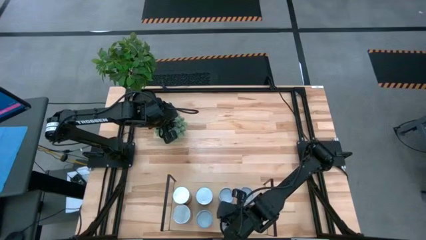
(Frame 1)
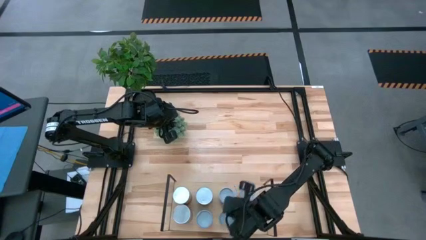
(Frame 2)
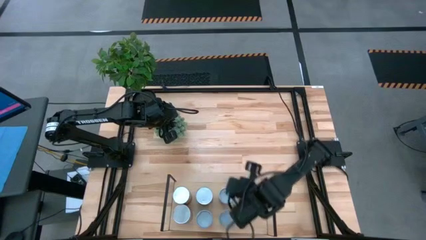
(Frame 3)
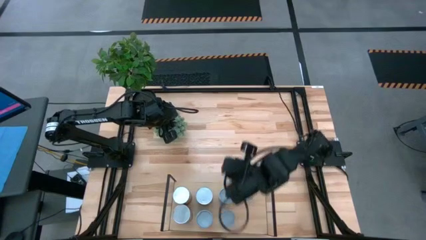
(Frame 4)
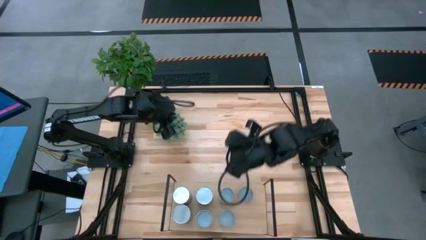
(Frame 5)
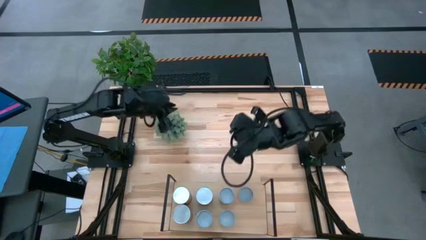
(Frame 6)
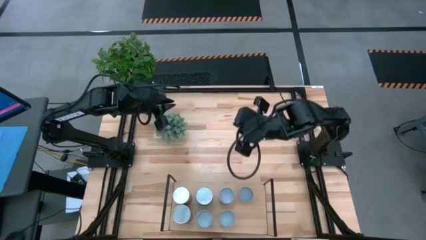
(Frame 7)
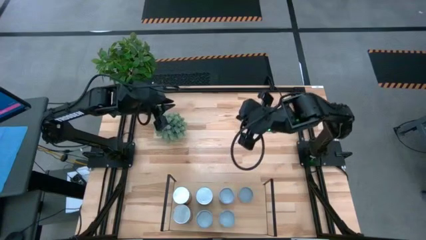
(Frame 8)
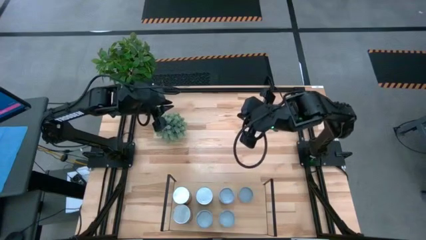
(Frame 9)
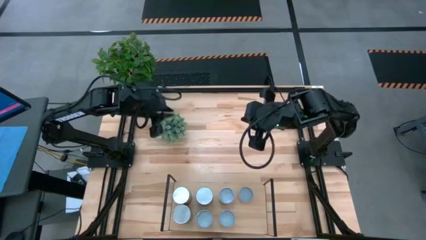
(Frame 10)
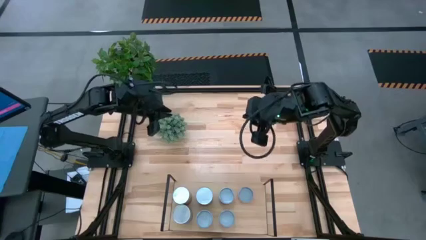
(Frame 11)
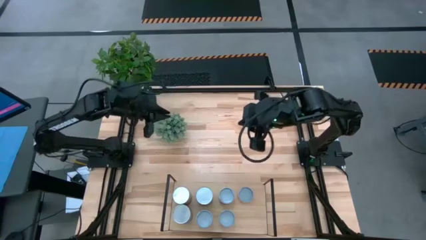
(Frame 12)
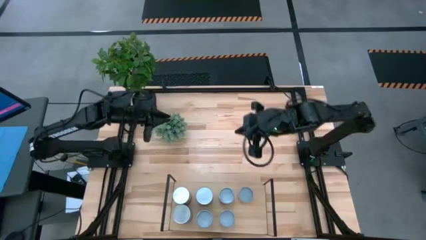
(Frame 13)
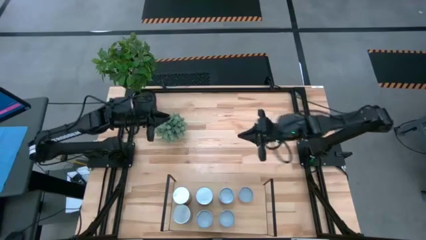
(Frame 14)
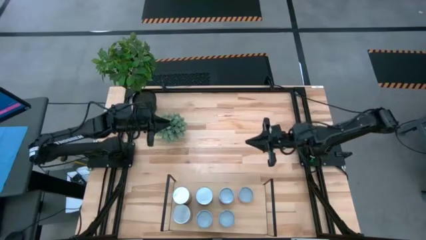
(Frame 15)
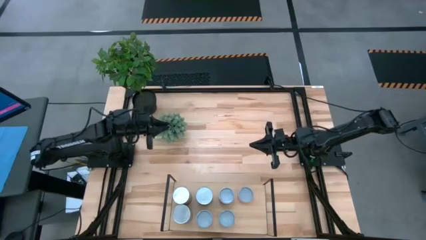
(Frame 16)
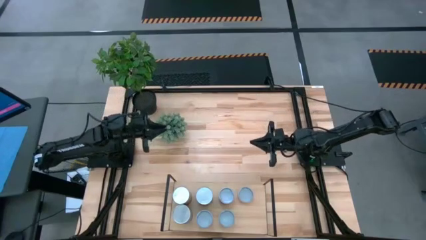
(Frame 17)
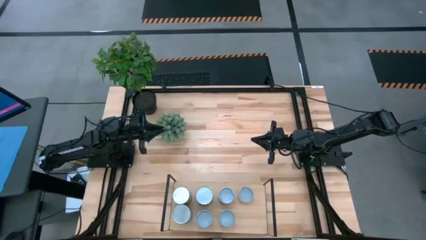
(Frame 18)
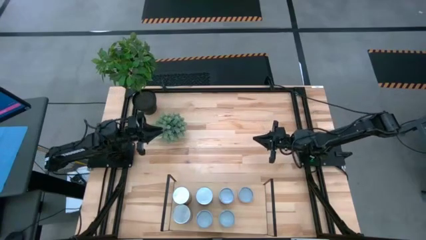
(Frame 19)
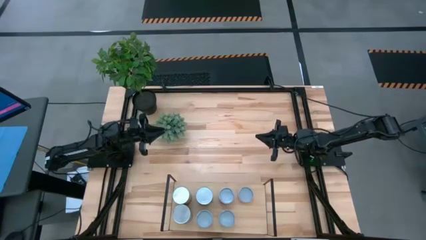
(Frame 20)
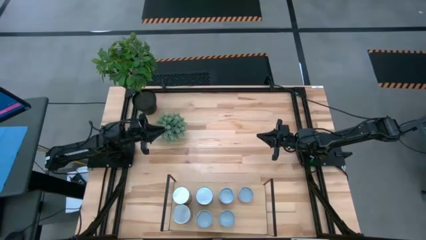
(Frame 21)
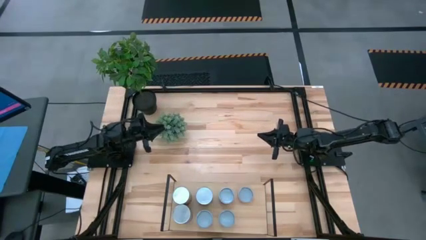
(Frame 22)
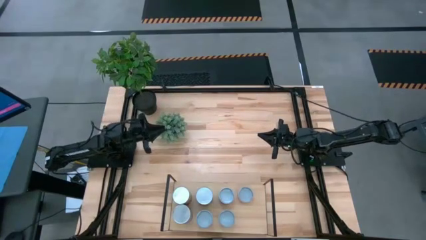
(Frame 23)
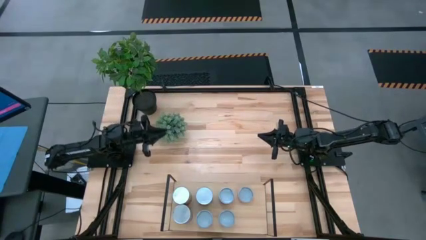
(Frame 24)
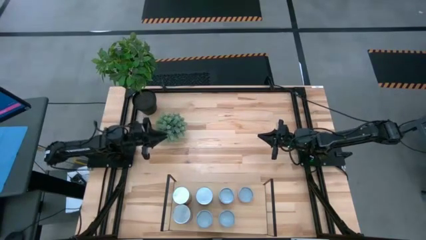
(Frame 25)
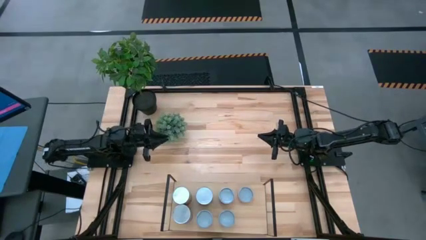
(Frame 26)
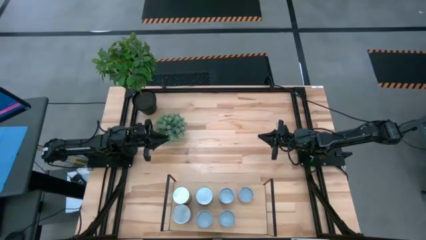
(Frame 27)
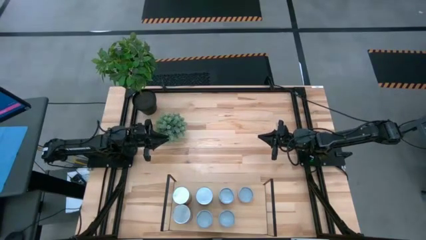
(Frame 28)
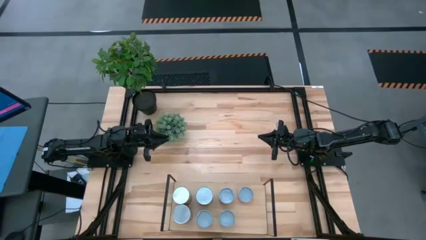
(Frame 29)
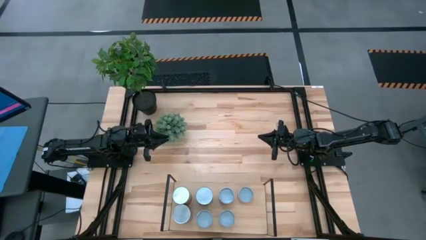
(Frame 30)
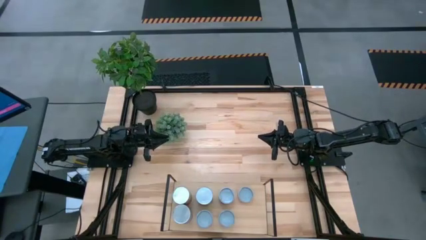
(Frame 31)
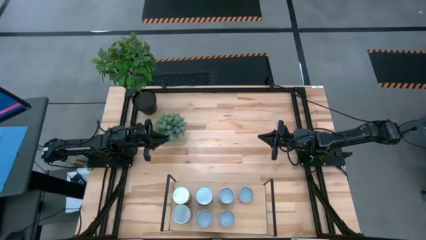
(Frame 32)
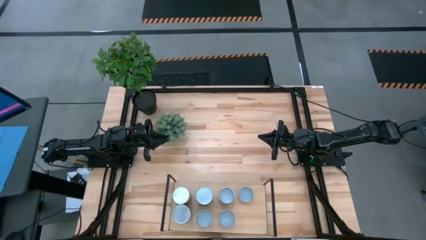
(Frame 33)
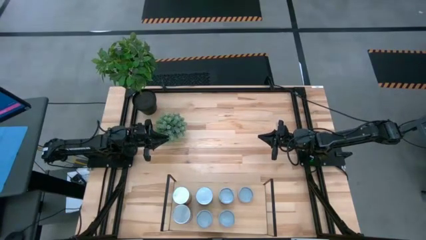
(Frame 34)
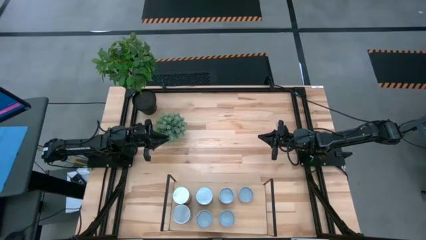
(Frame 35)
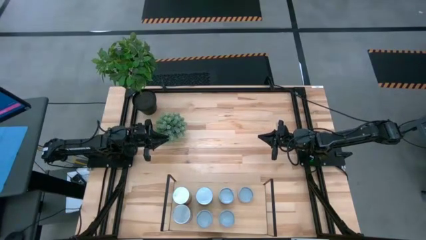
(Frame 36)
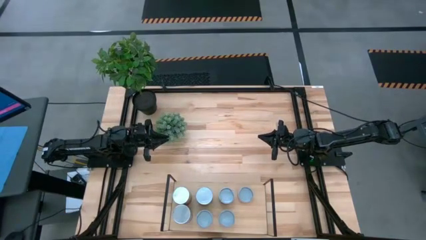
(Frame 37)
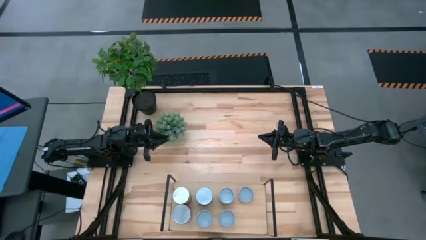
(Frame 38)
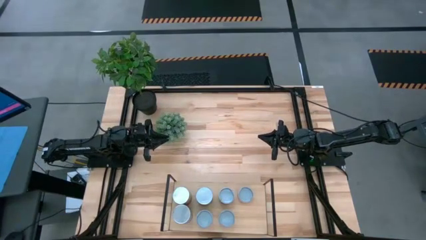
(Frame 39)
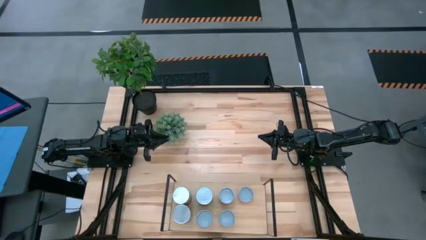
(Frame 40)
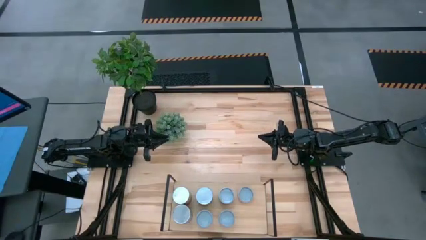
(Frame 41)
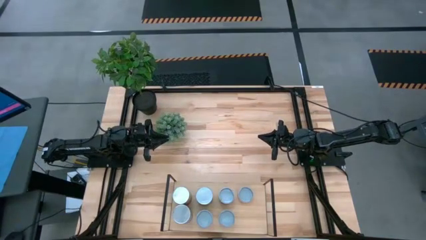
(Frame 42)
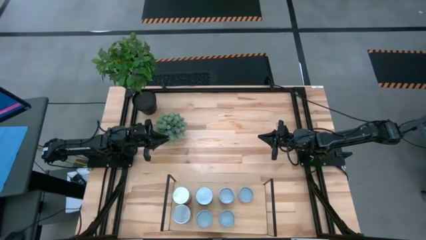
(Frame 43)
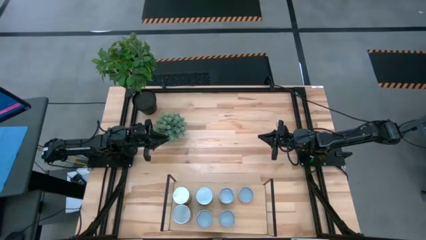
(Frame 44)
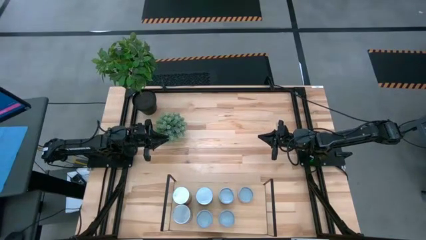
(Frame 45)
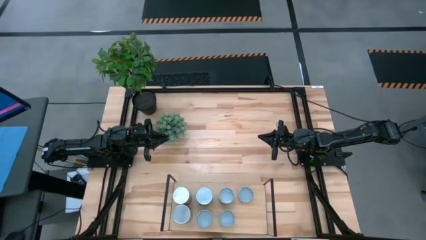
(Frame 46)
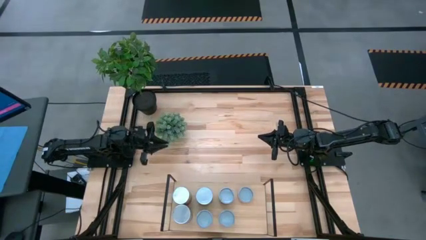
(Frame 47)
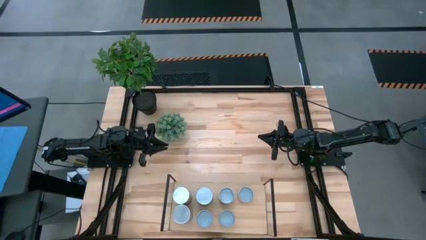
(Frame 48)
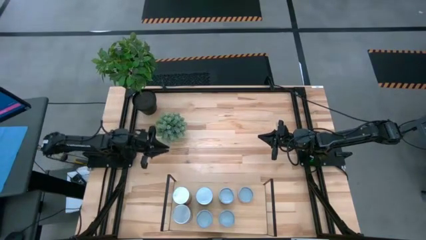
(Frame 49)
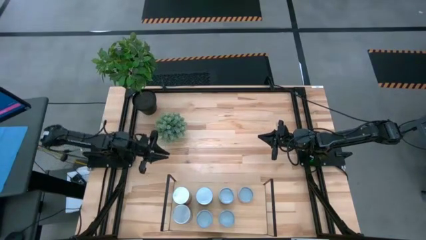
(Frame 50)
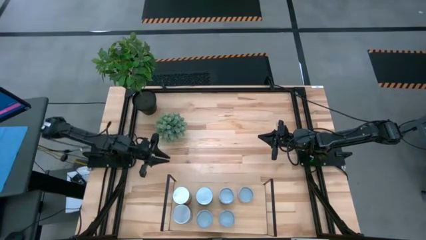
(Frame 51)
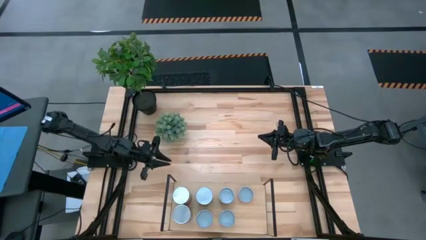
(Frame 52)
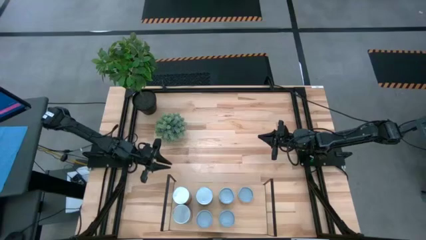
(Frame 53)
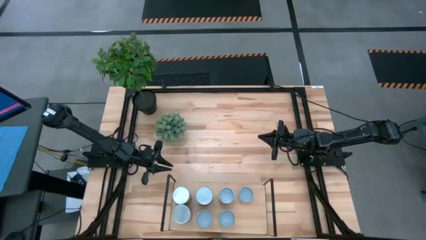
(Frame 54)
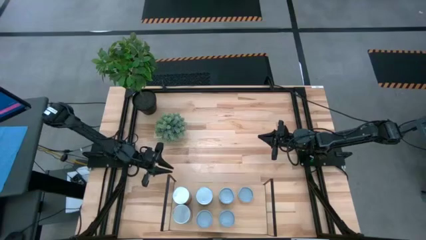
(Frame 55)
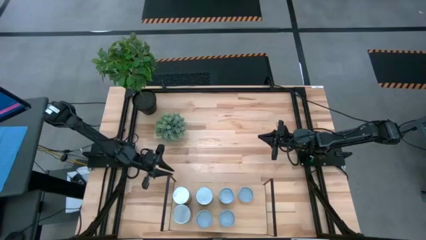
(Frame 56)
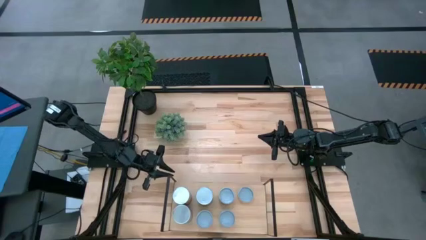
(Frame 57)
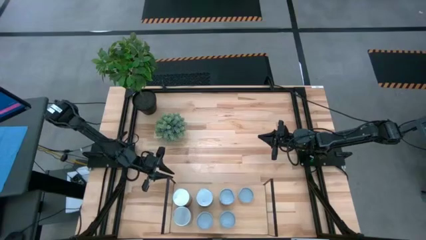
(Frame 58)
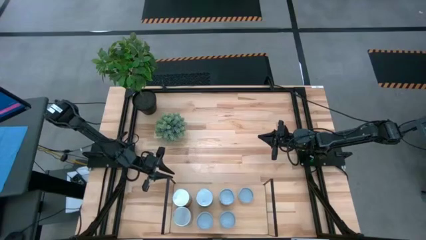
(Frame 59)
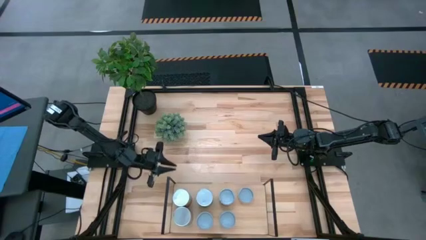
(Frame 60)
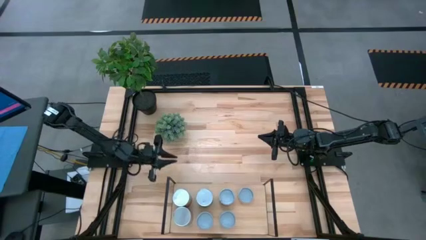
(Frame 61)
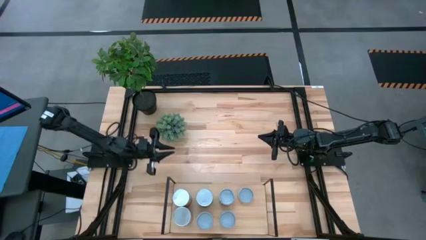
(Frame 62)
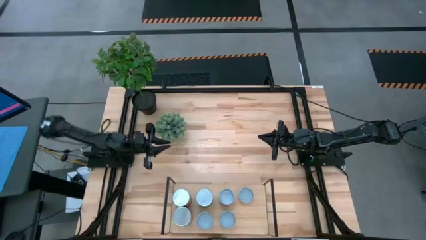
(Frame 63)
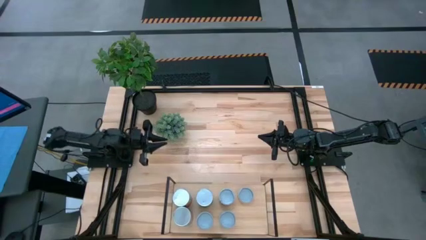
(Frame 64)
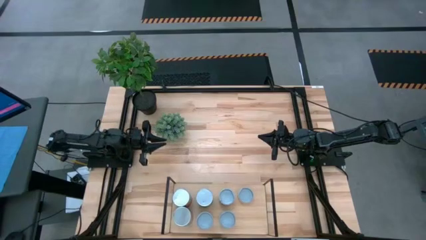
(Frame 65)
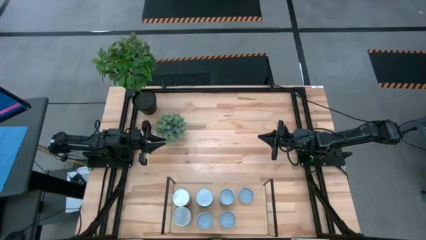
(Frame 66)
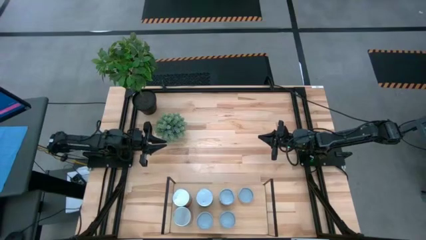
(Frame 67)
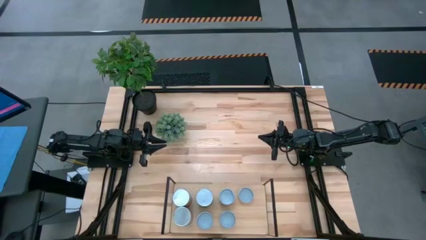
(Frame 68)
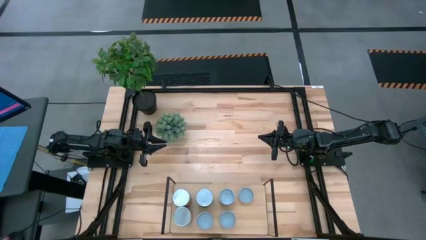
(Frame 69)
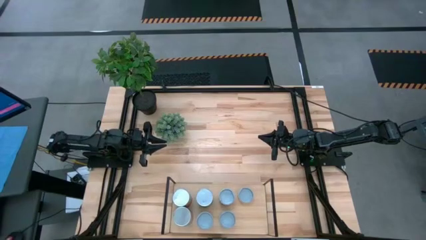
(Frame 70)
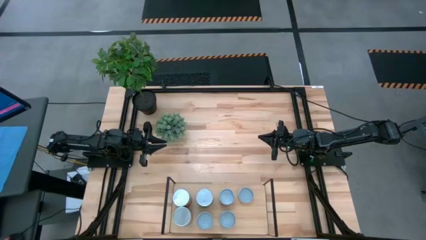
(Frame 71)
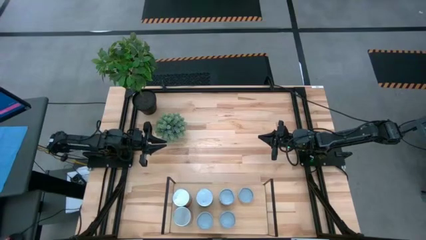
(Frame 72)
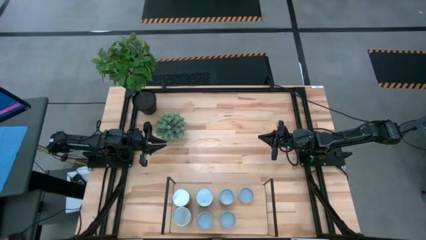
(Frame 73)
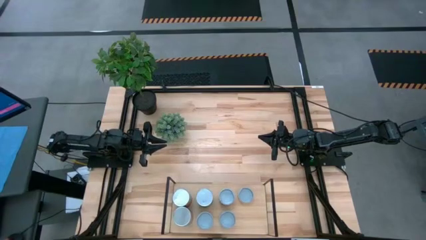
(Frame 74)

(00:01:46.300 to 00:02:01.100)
Task: Pick and place cans onto a shelf
Return to Home Position
